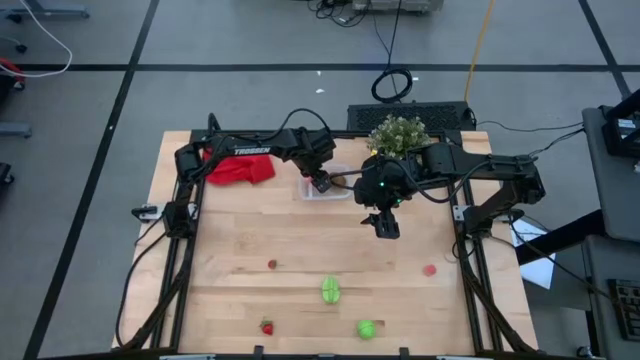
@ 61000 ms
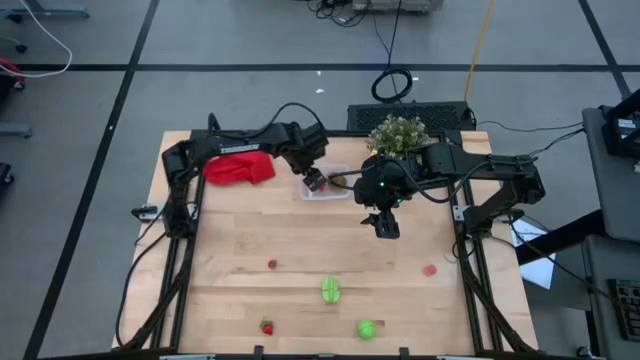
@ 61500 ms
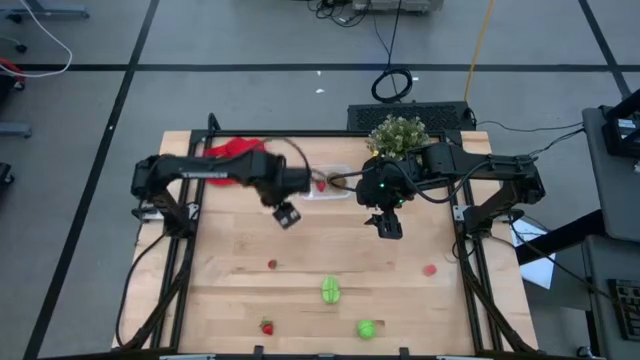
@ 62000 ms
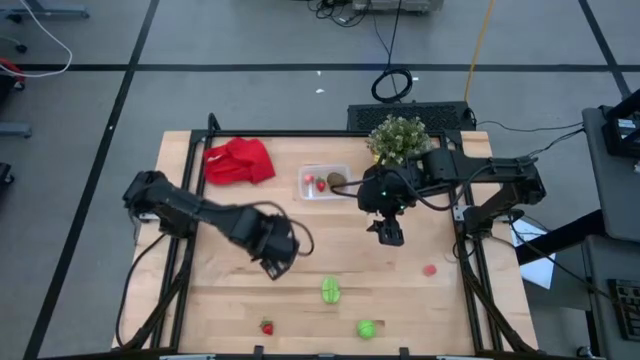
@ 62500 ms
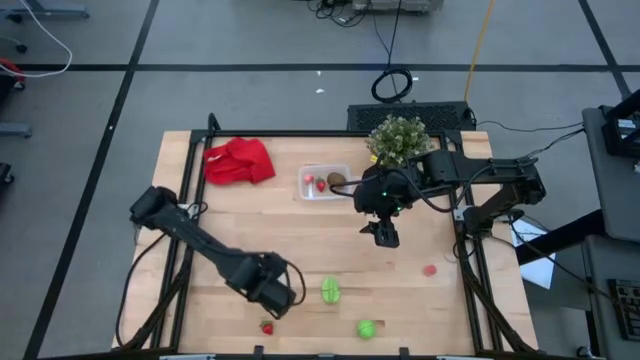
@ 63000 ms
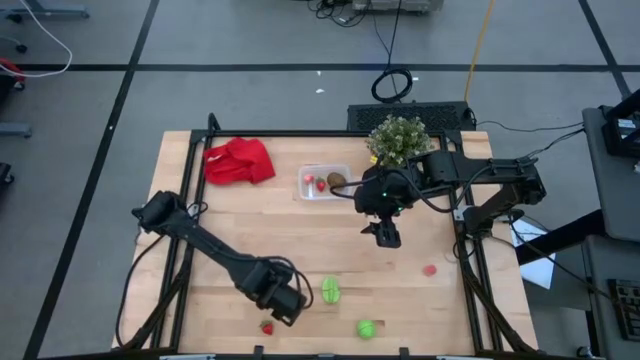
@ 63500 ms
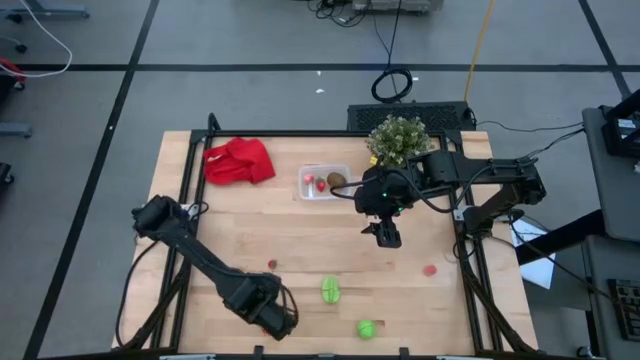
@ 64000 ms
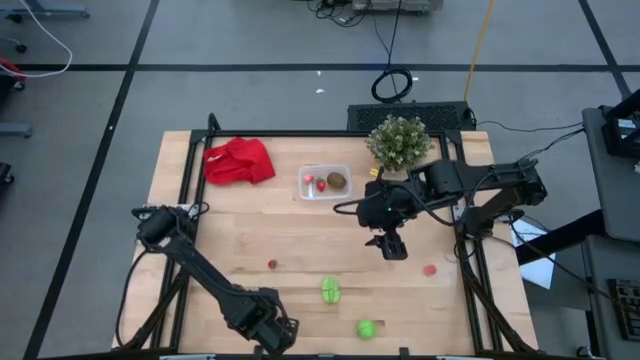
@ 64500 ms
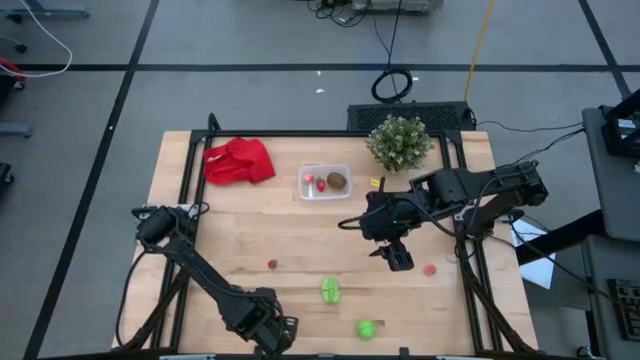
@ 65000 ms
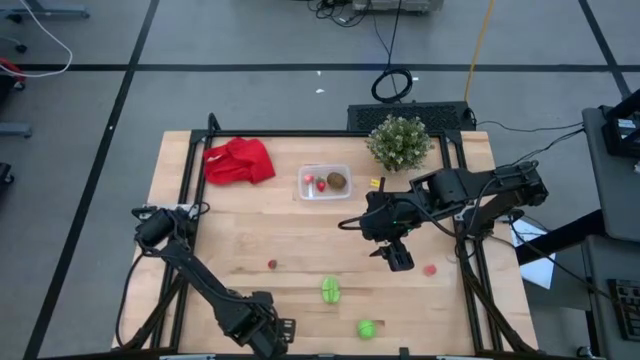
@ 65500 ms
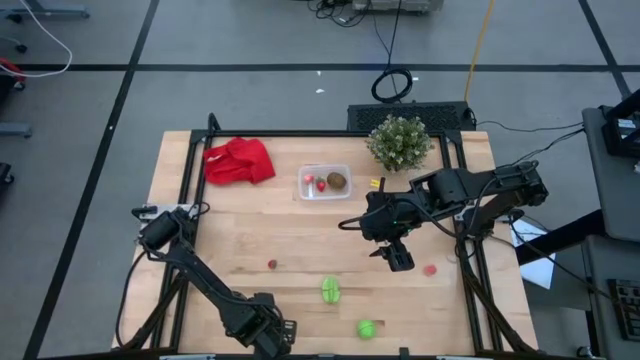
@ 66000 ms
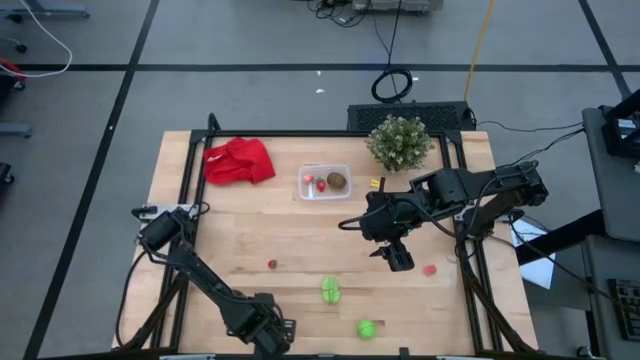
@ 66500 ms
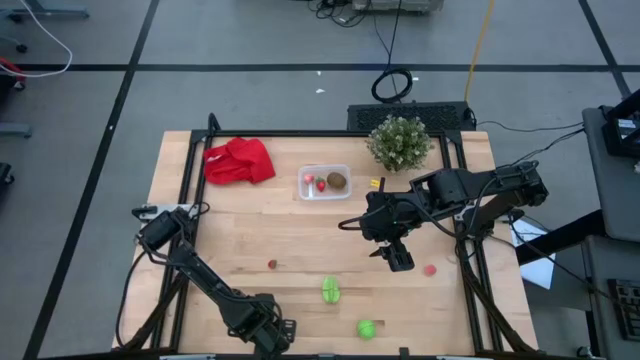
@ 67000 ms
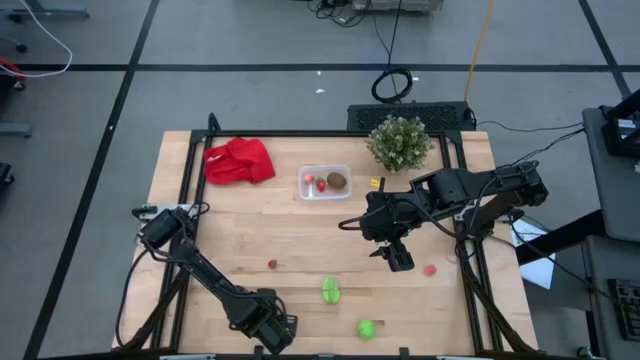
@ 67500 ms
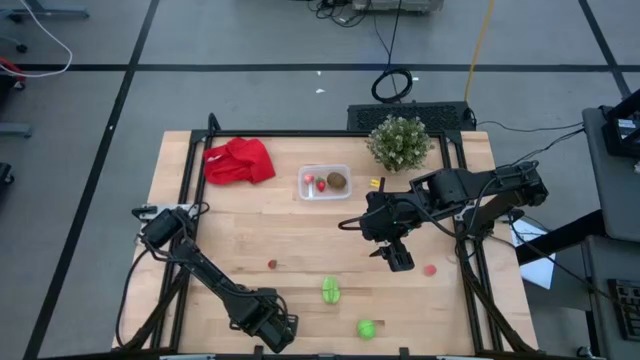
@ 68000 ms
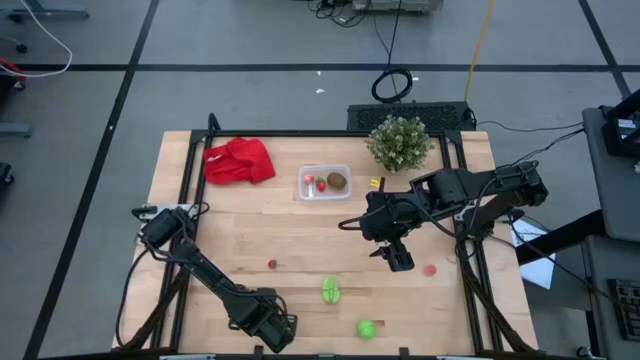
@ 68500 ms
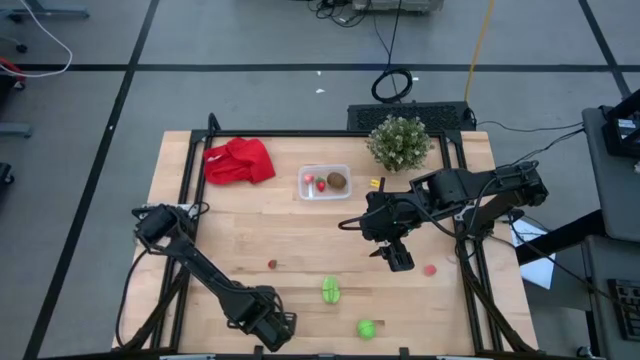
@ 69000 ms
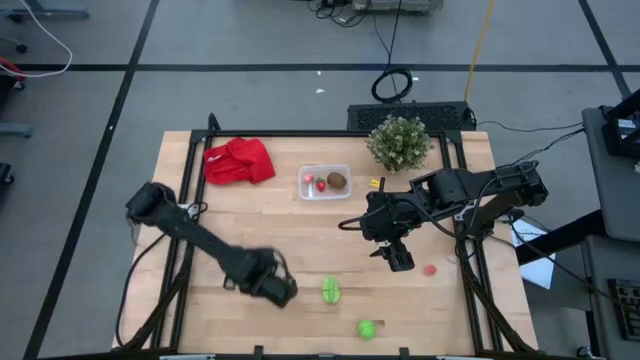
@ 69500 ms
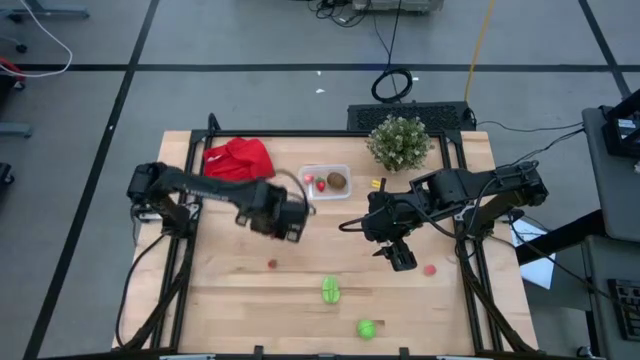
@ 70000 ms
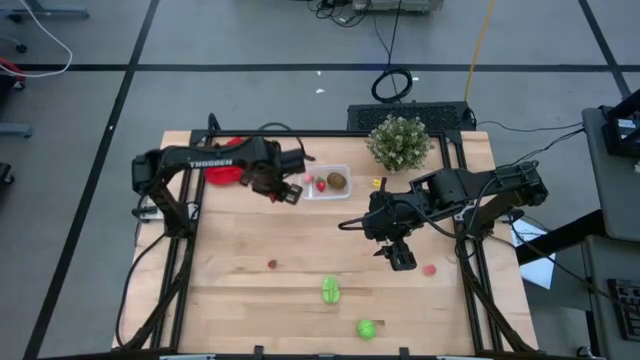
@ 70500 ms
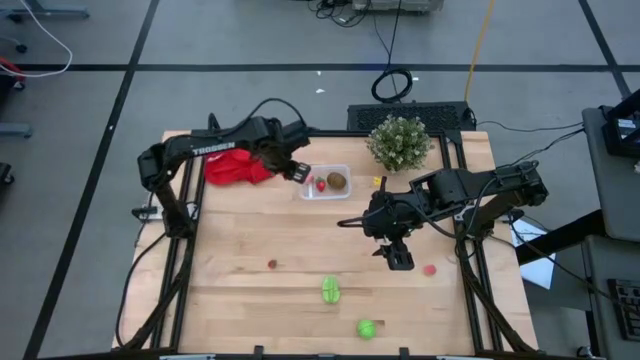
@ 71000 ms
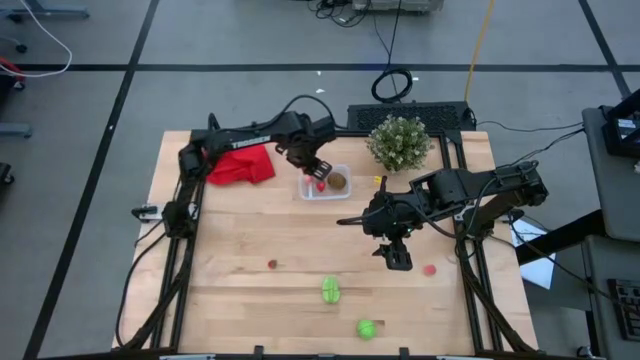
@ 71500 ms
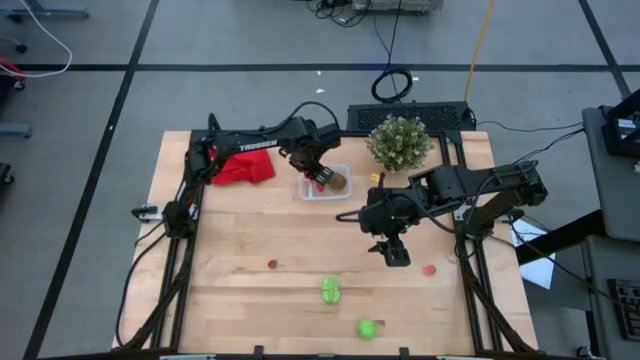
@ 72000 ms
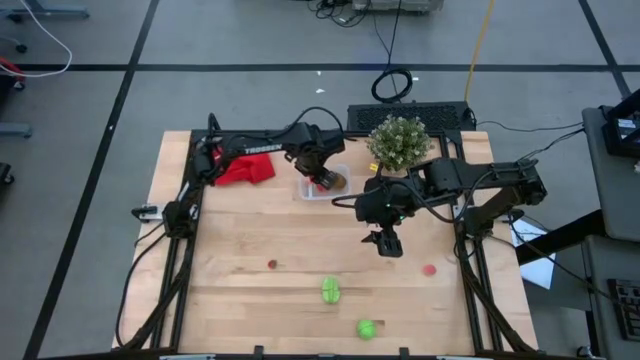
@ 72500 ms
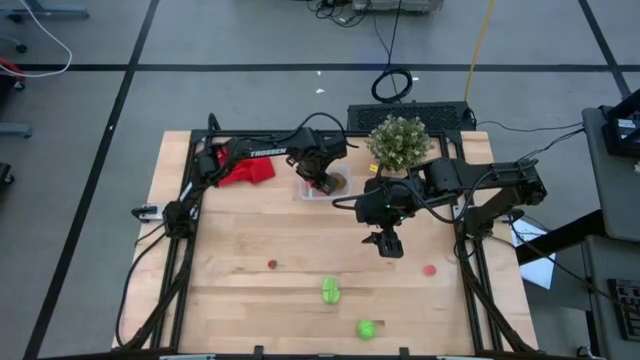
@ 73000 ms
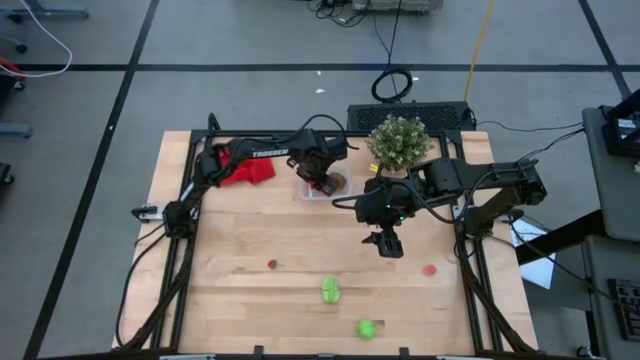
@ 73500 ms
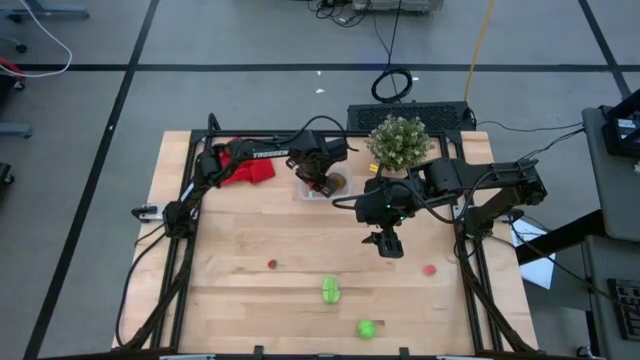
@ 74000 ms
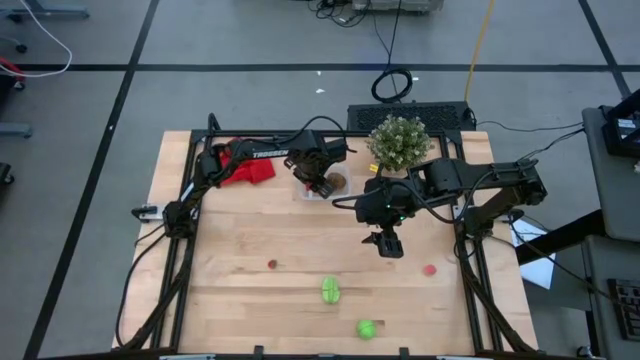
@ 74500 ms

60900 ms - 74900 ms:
Task: Pick and placing Produce into tupperware
Put the bottom strawberry into the bin

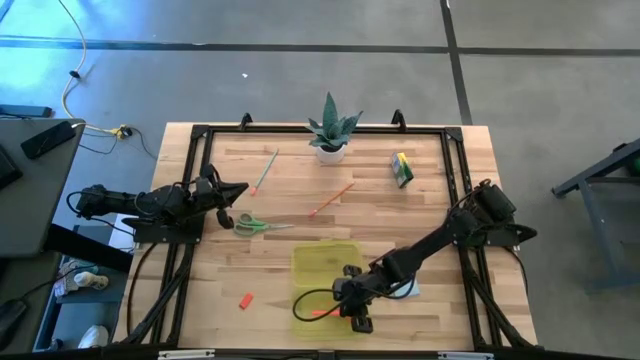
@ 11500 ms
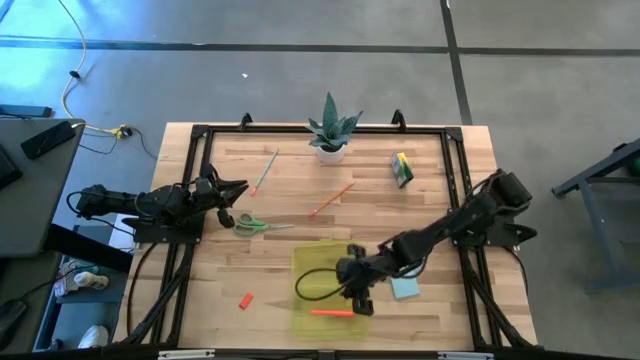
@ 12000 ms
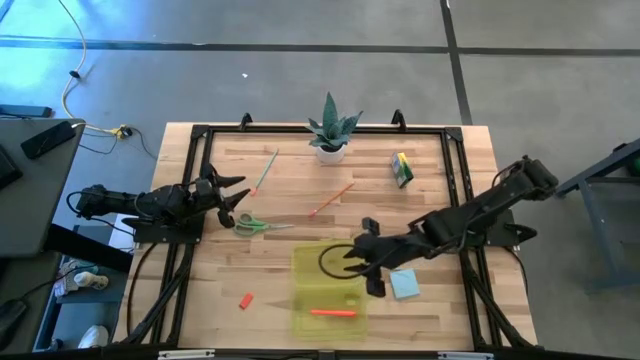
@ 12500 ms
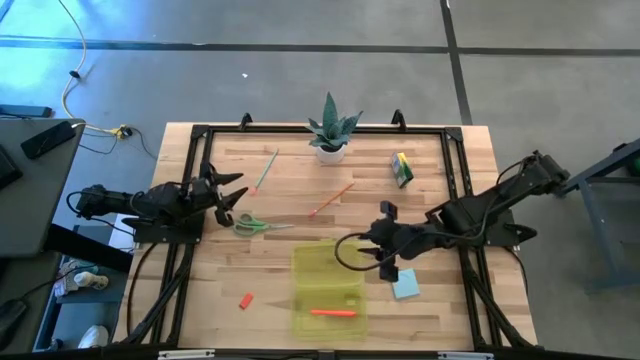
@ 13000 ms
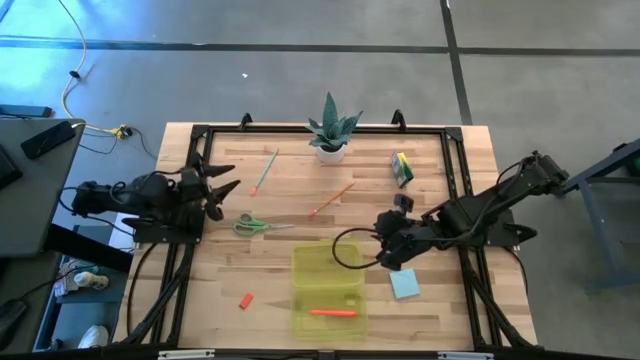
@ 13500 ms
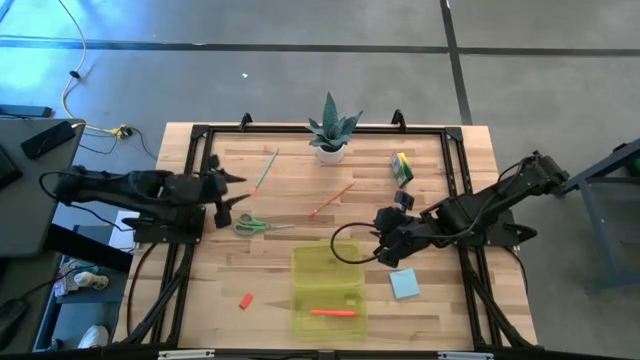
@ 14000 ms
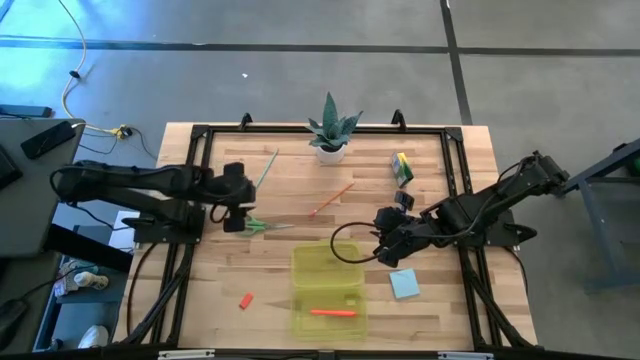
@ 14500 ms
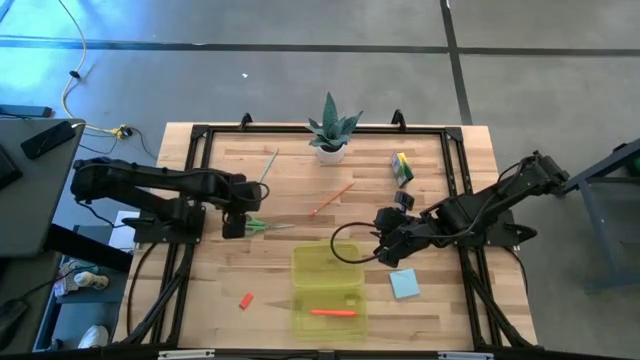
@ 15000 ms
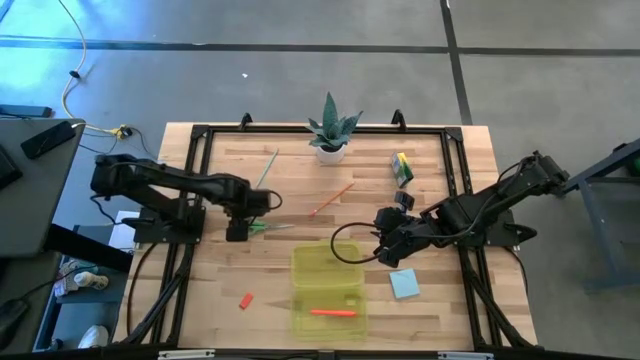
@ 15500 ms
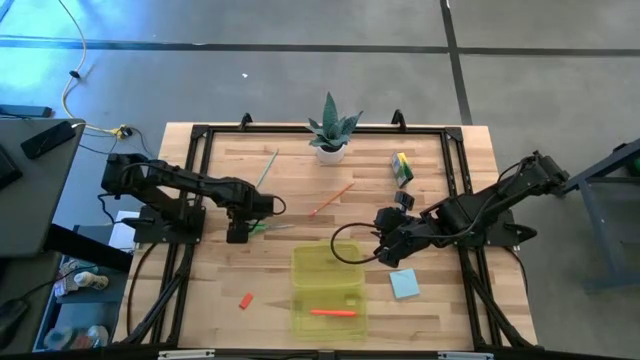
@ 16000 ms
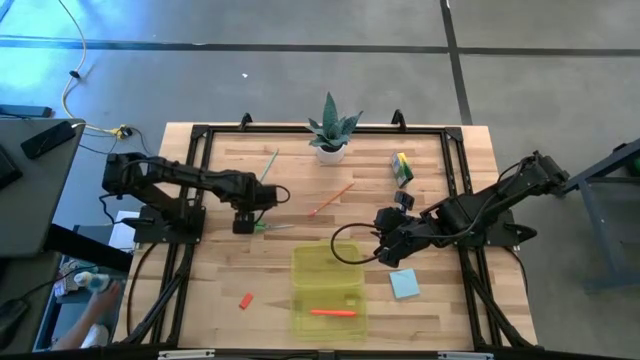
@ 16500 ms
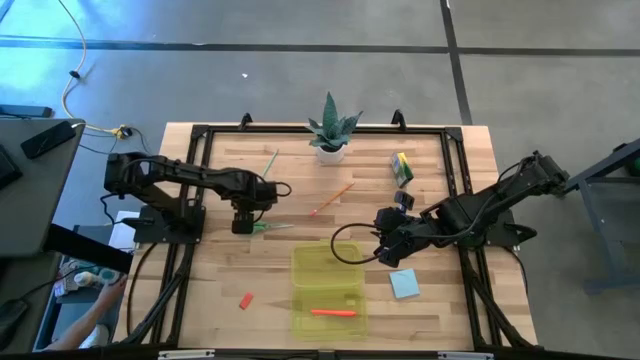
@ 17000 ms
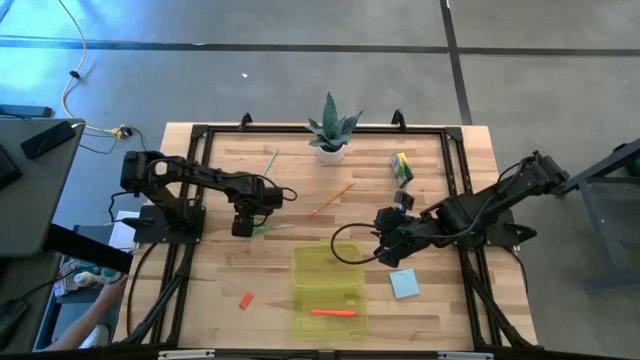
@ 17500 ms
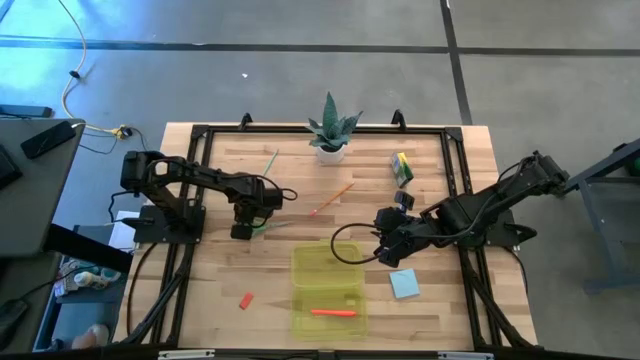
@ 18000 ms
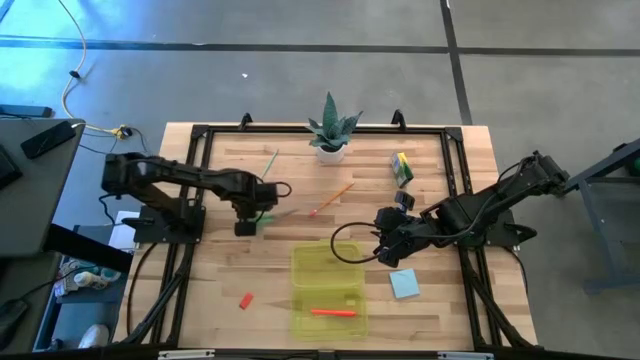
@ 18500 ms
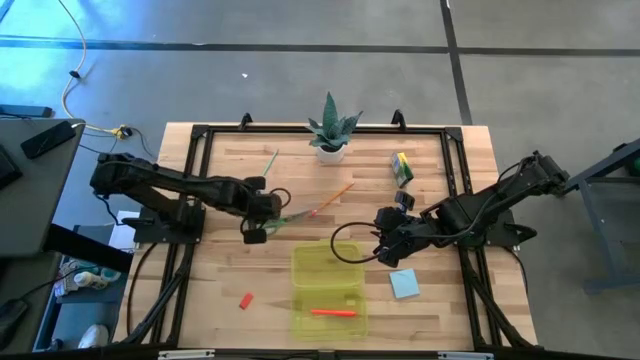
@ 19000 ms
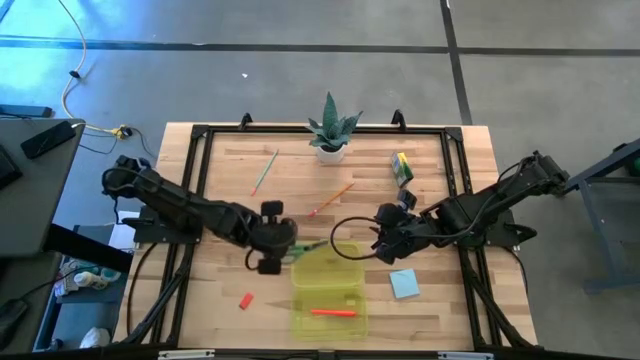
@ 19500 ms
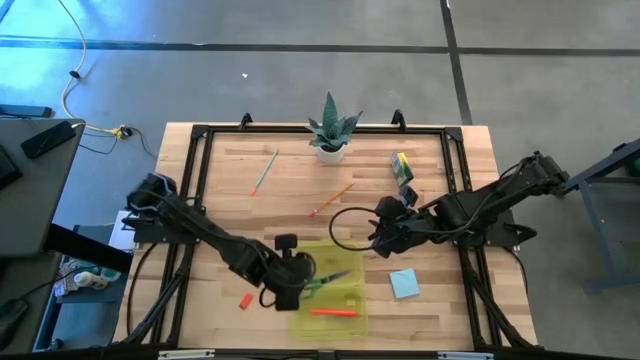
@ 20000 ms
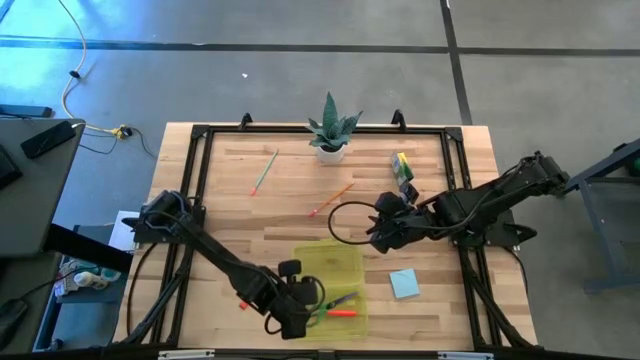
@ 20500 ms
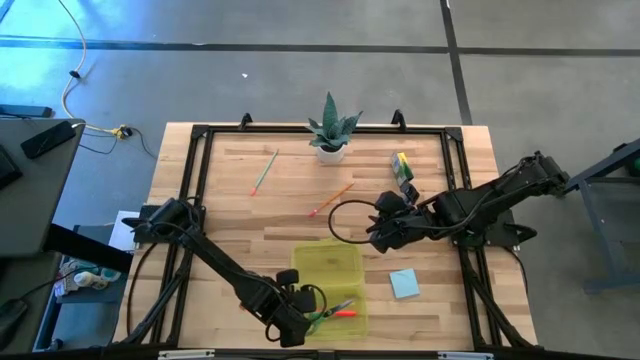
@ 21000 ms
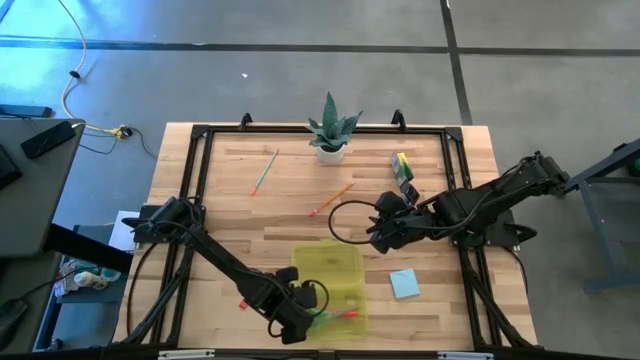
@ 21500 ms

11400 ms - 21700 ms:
Task: Pack school essentials
Put the green scissors into the yellow supply box
